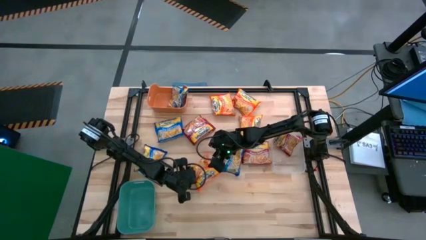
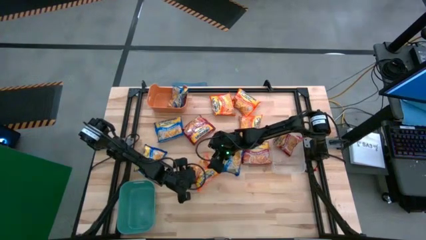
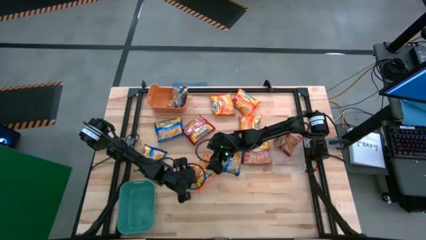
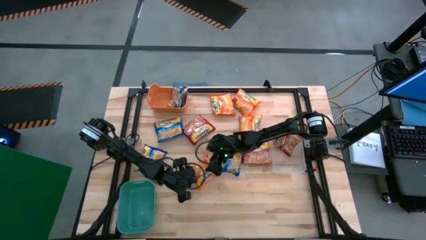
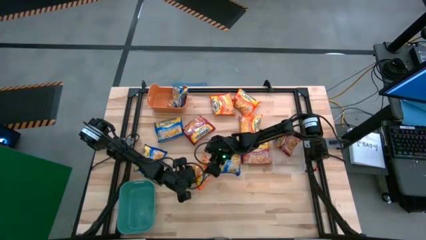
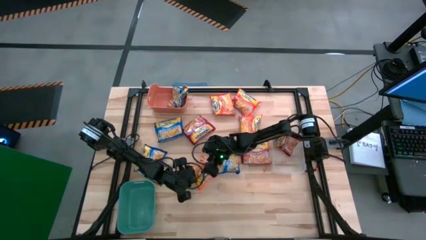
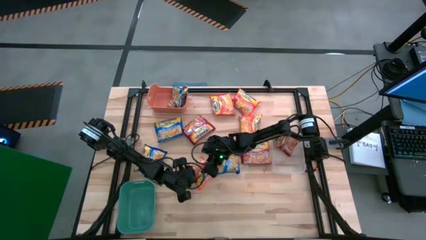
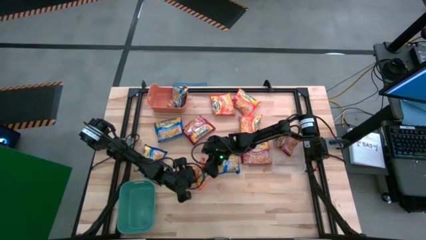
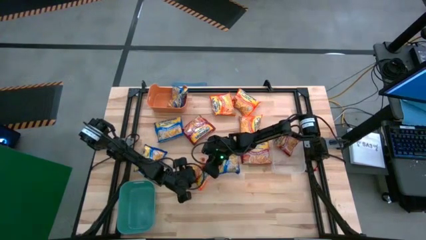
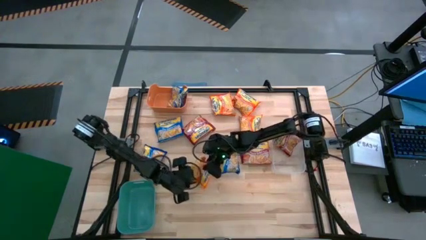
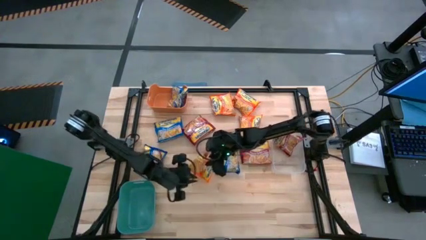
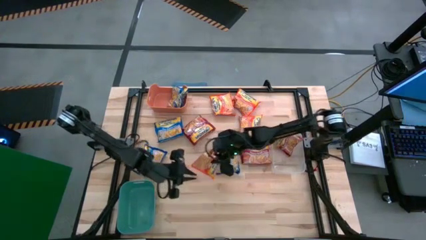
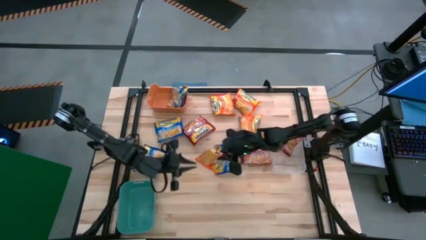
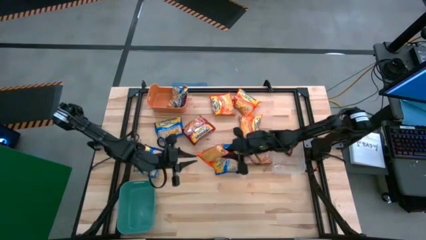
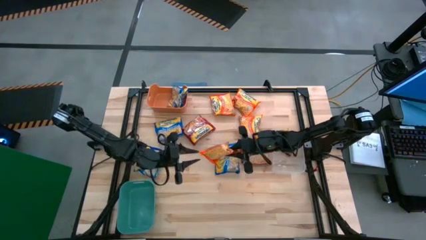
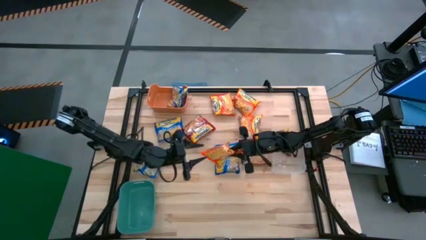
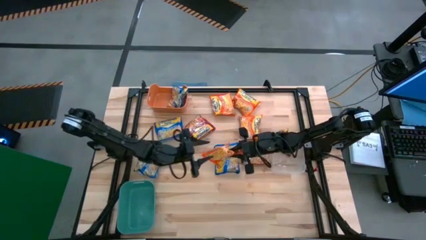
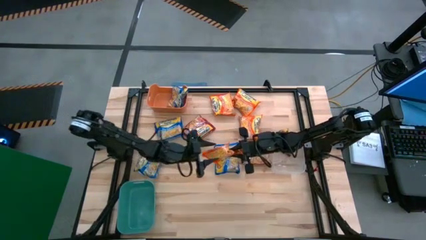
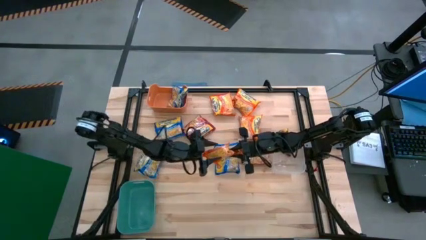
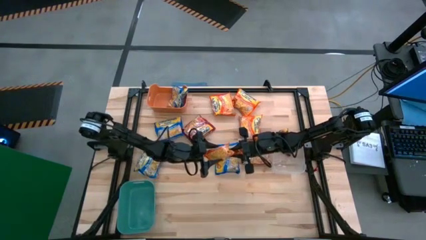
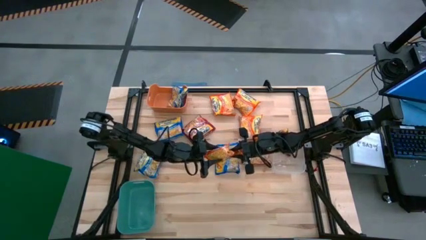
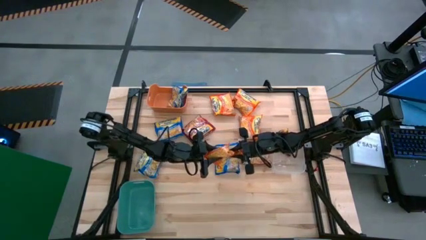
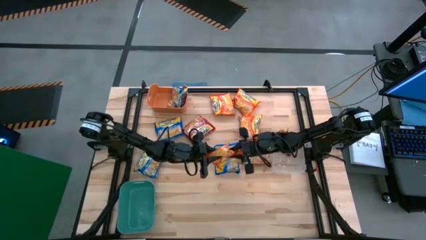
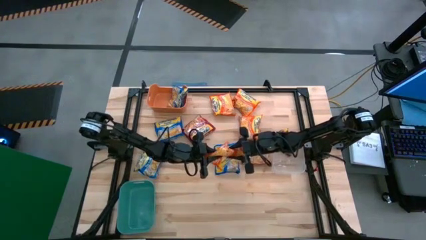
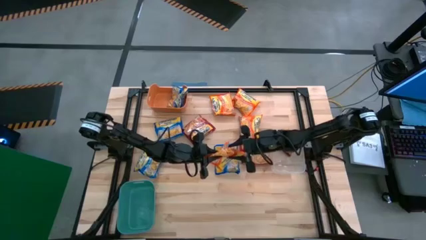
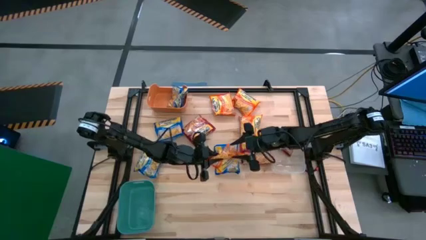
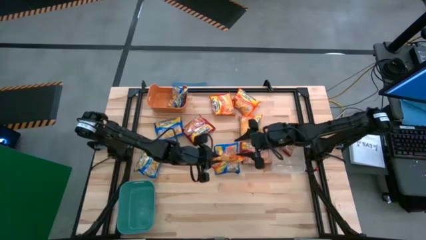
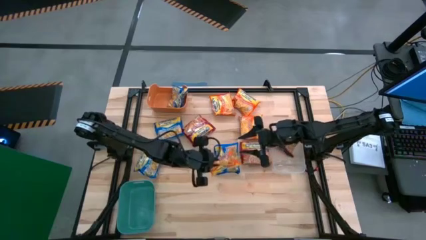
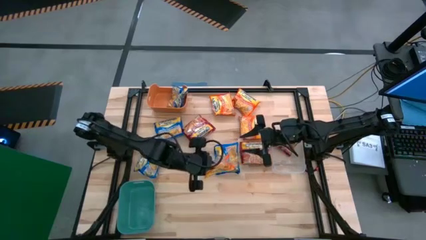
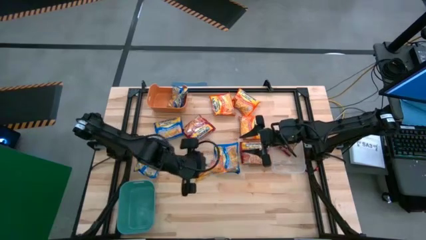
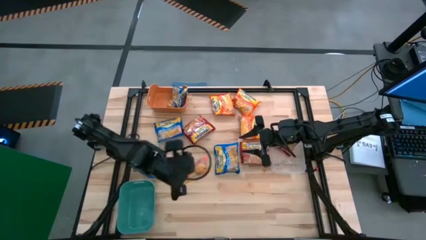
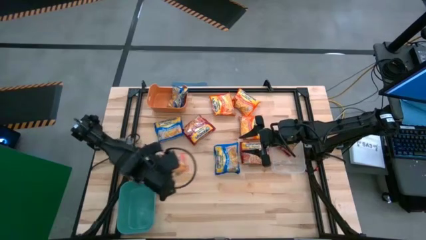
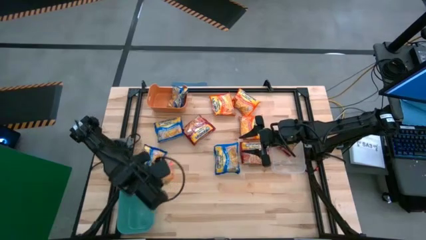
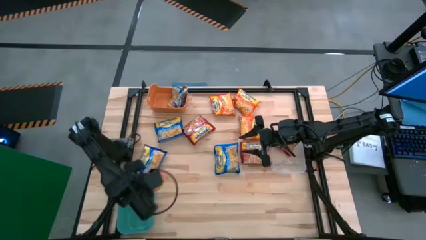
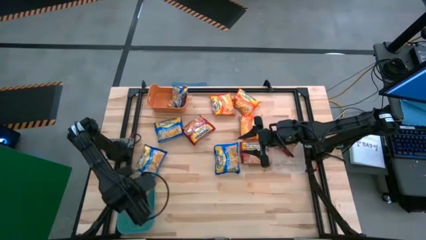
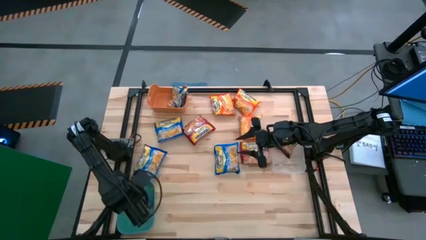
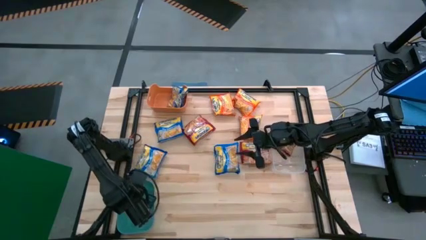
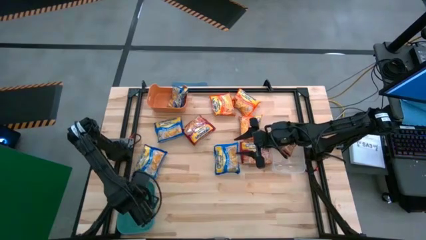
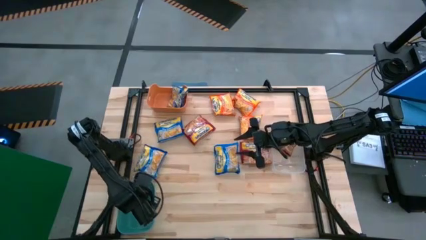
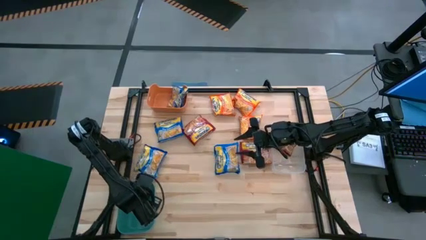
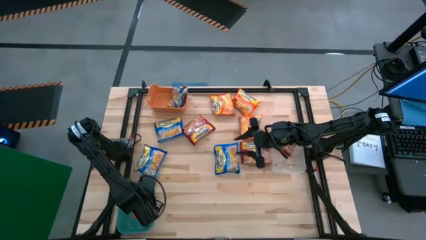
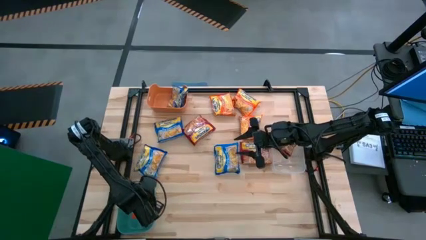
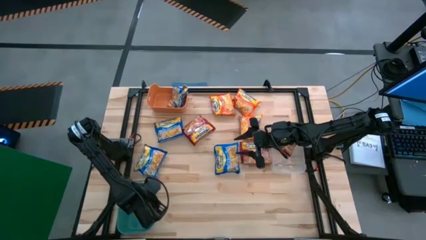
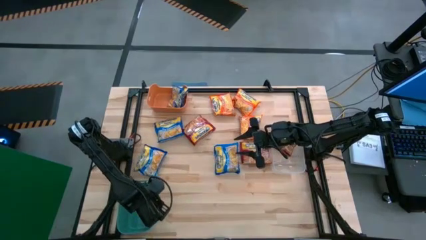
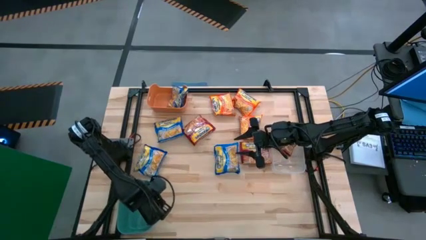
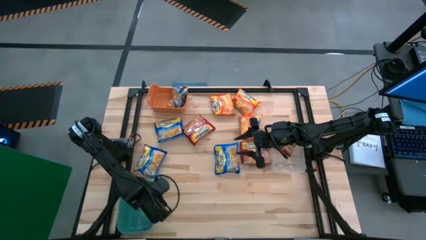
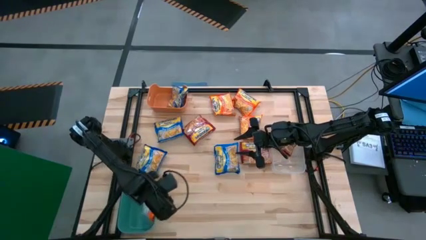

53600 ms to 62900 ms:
Task: Sort Maruchan noodles
Put the orange noodle pack into the green bin

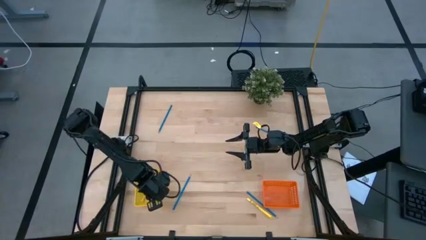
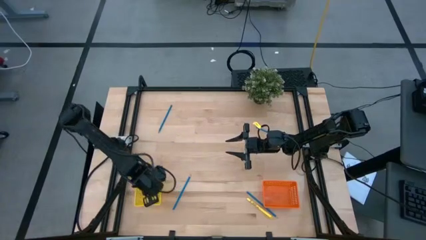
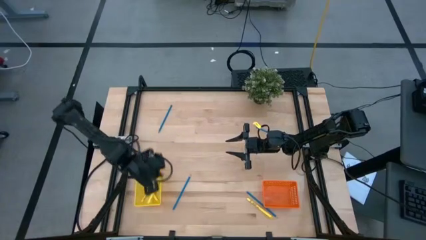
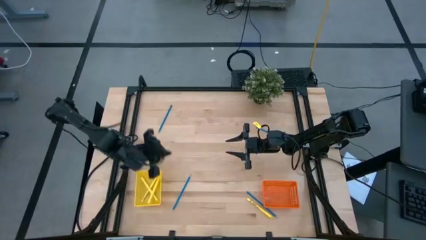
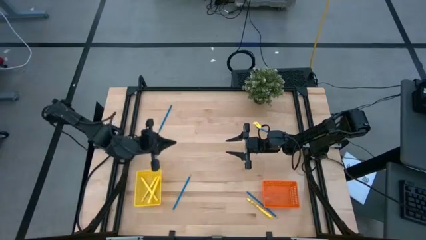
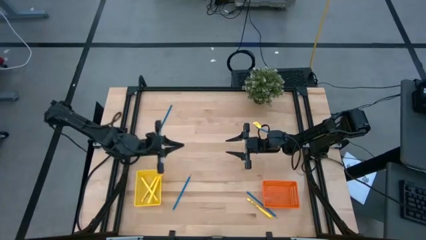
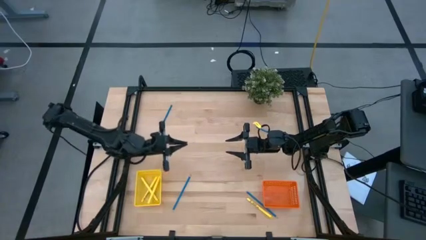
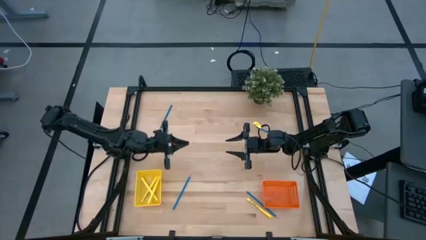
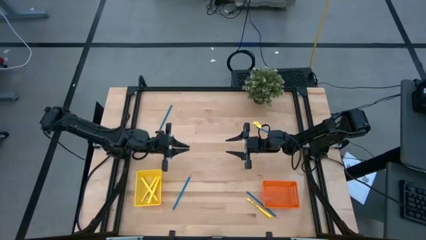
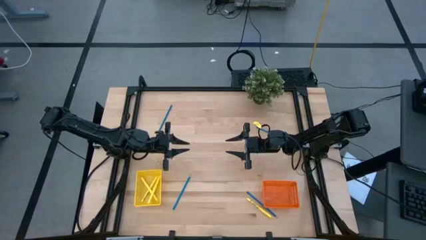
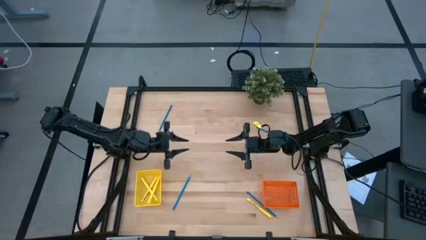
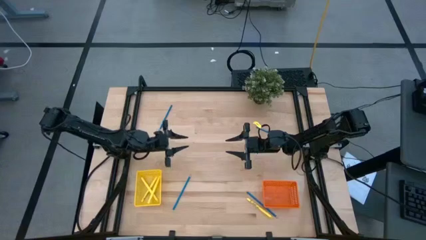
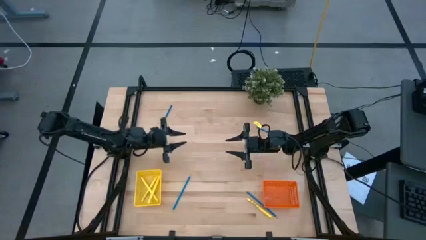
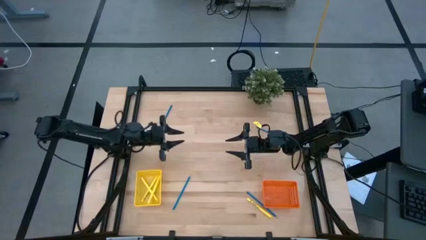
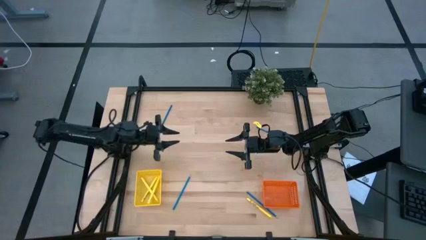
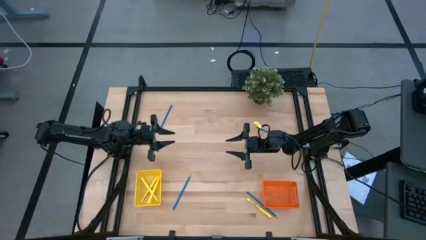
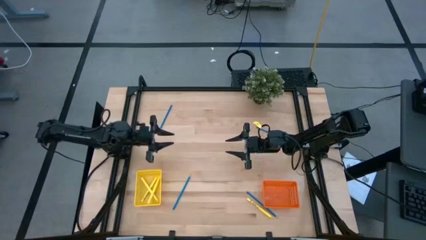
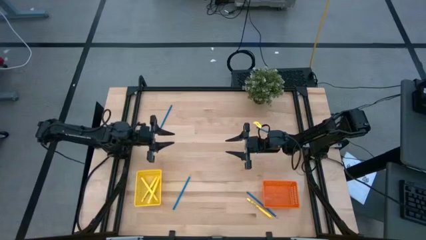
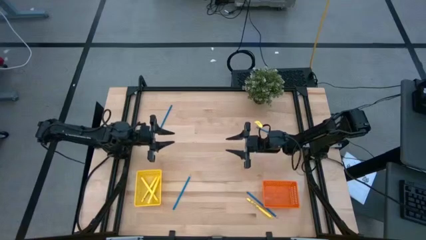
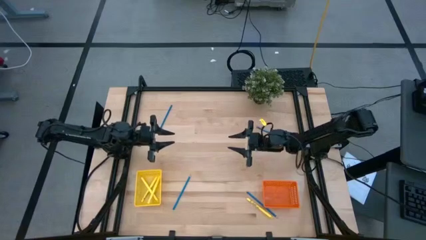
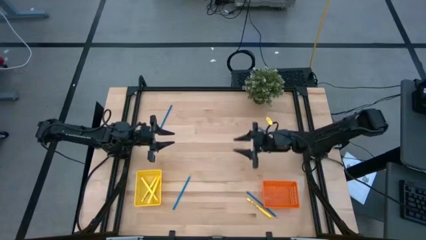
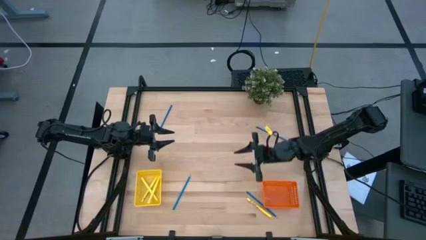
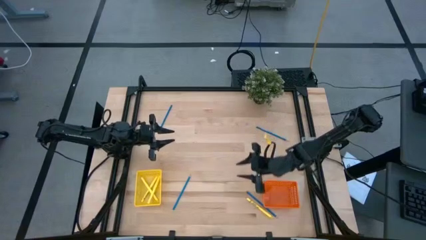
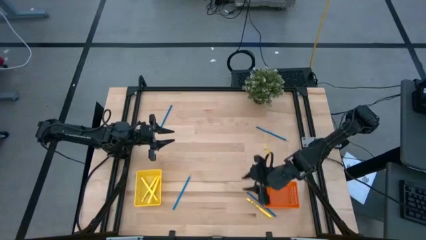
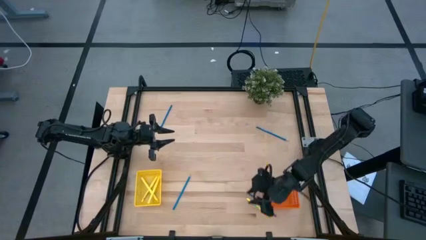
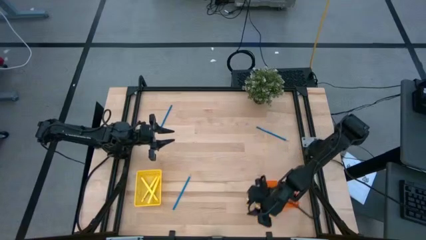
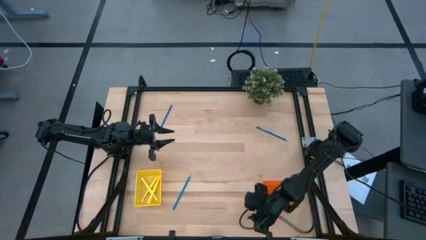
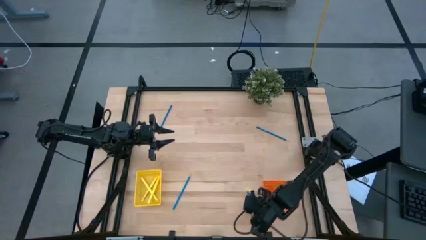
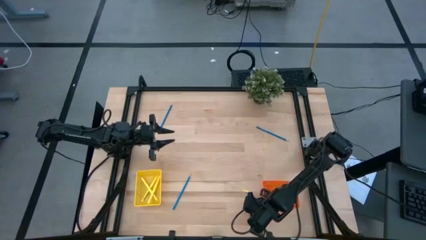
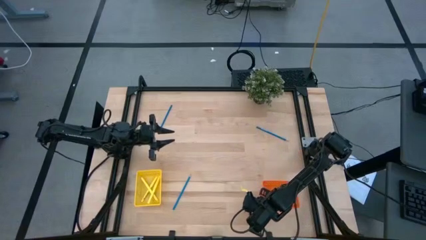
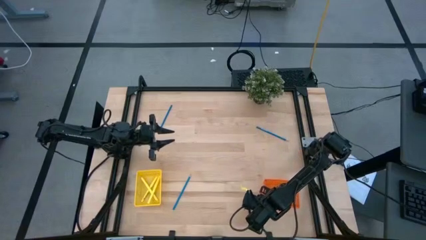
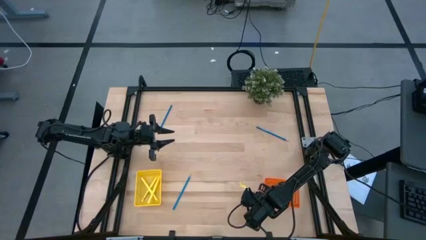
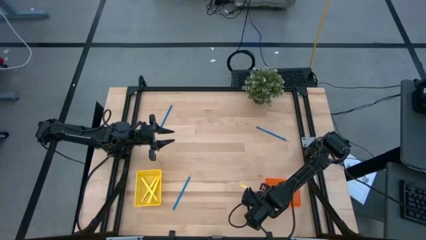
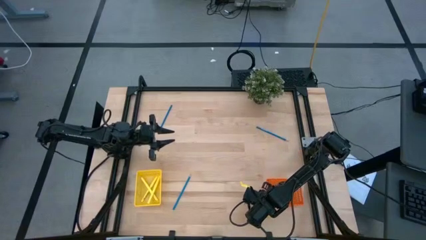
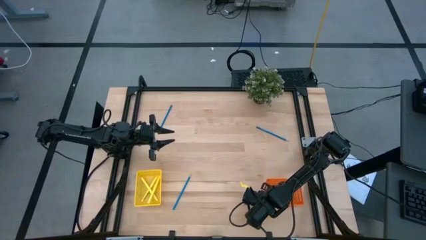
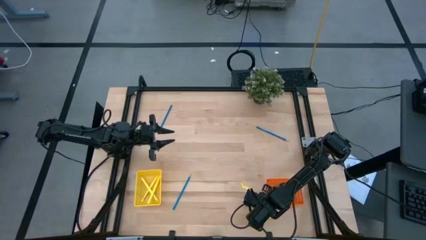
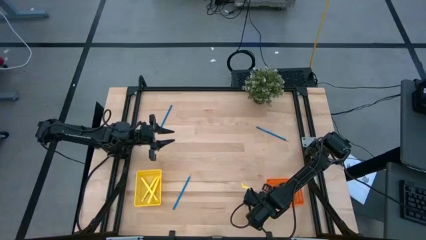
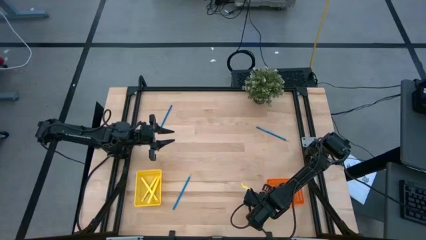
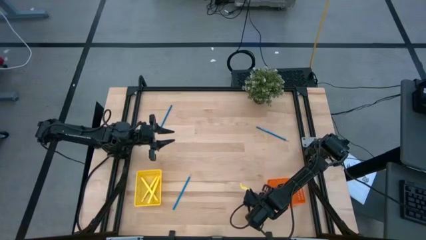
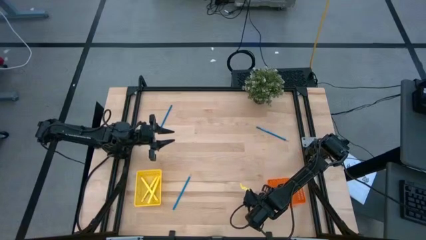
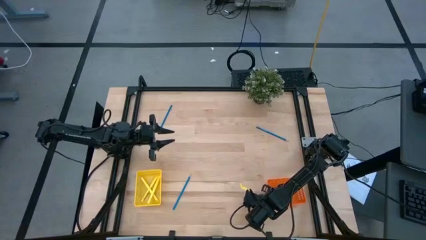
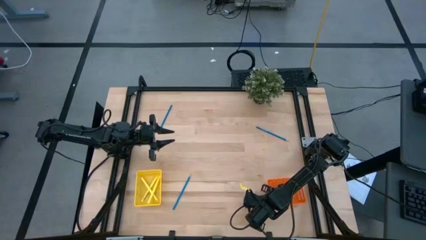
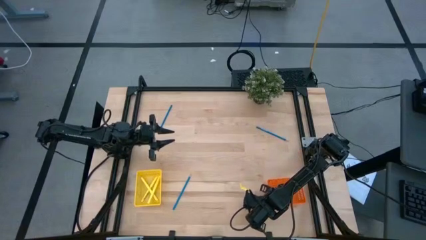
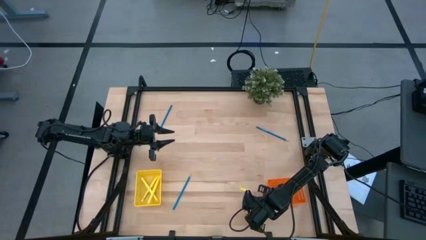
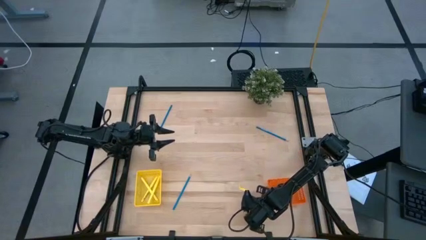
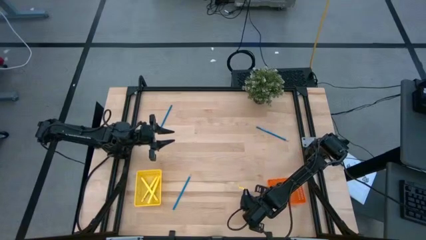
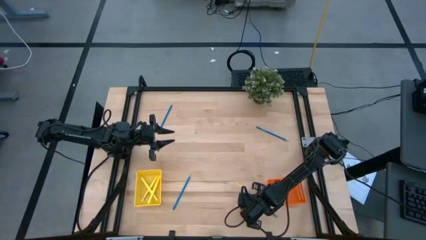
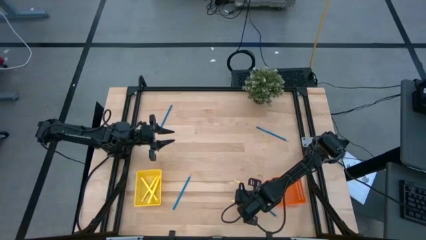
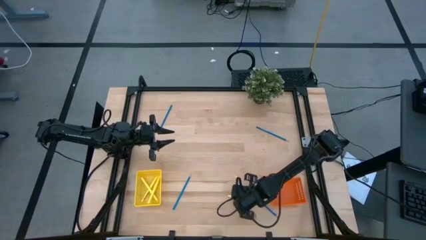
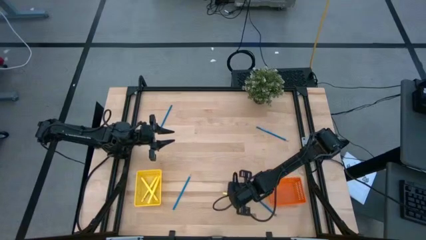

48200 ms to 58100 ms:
Task: Sort pens & pencils
Put the yellow pen into the yellow bin
